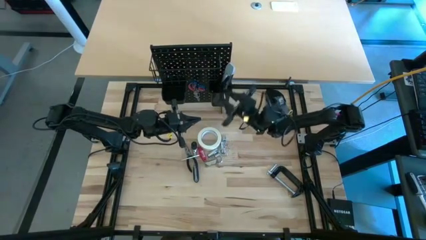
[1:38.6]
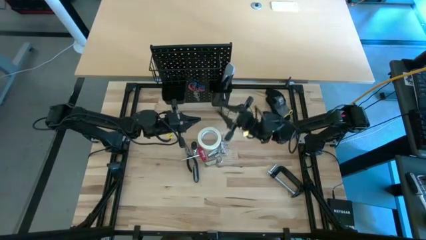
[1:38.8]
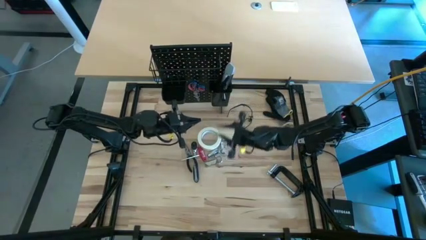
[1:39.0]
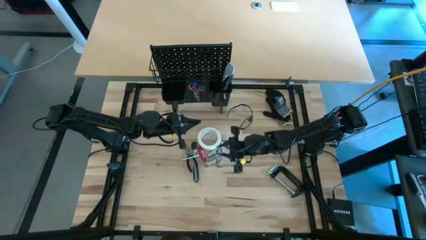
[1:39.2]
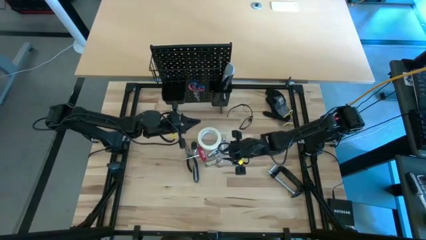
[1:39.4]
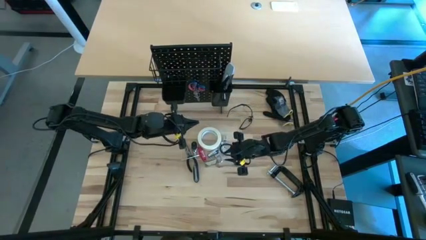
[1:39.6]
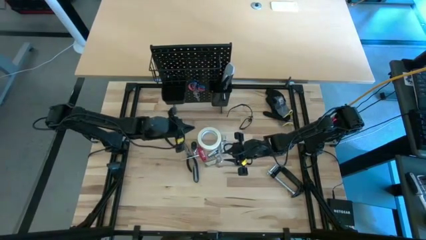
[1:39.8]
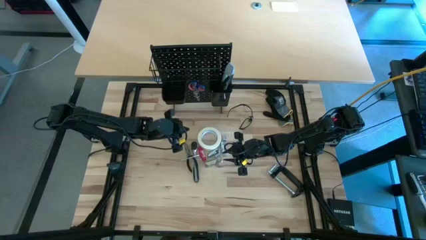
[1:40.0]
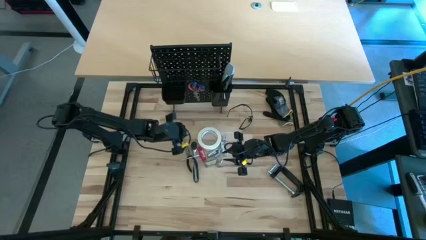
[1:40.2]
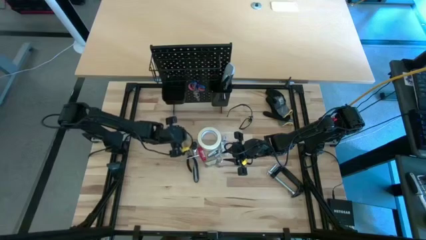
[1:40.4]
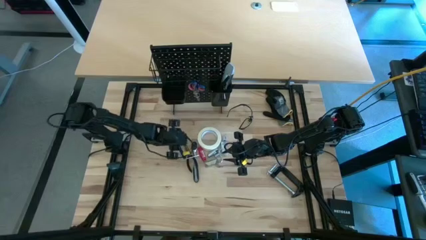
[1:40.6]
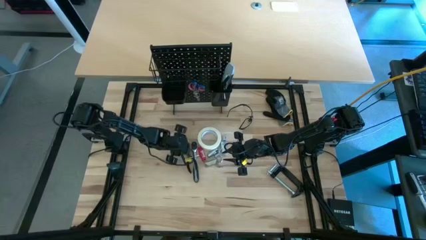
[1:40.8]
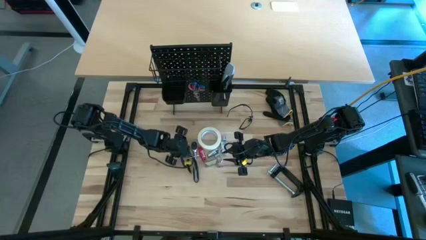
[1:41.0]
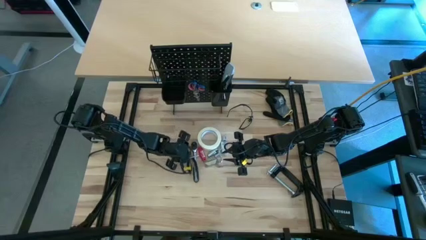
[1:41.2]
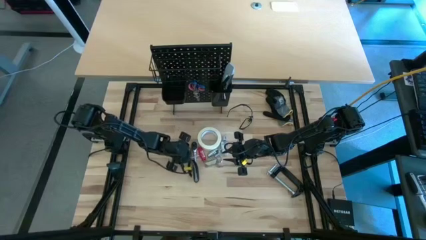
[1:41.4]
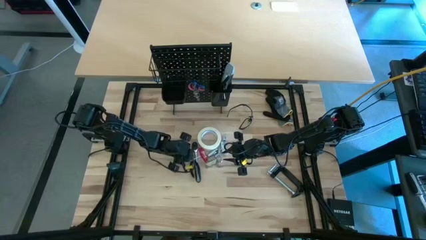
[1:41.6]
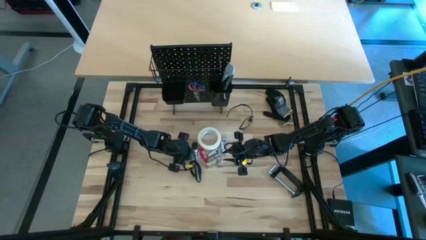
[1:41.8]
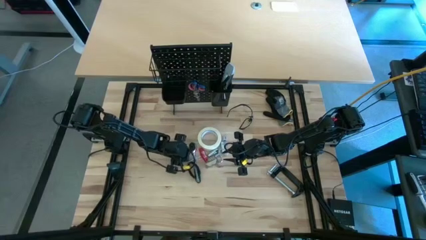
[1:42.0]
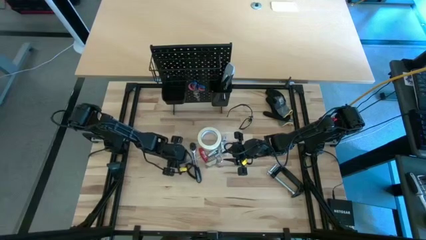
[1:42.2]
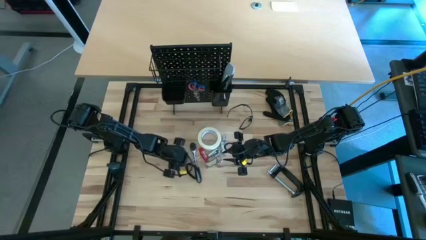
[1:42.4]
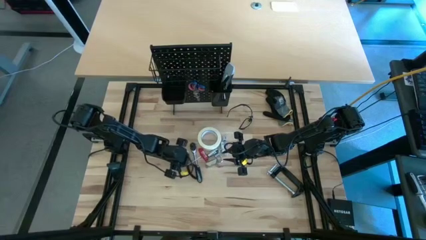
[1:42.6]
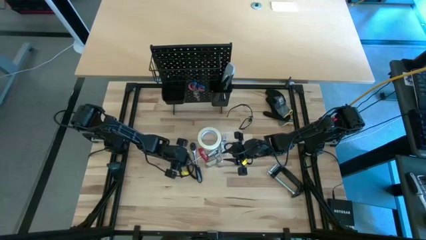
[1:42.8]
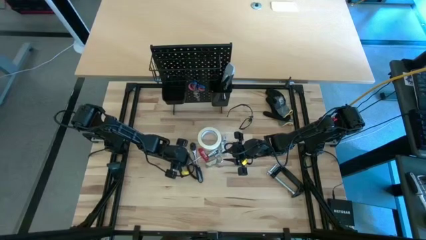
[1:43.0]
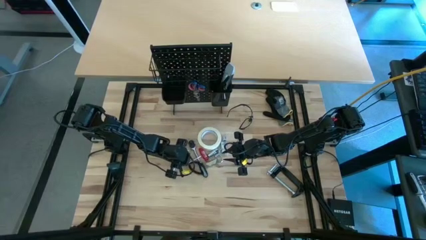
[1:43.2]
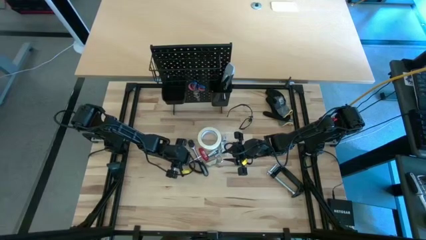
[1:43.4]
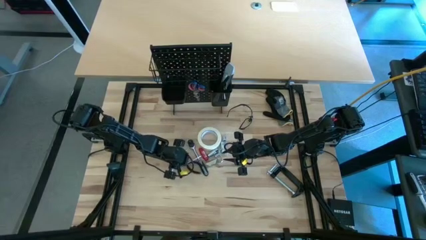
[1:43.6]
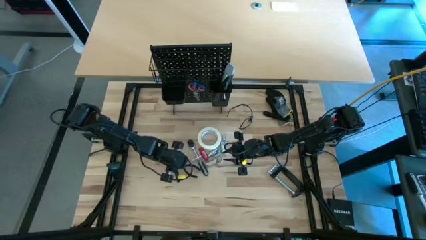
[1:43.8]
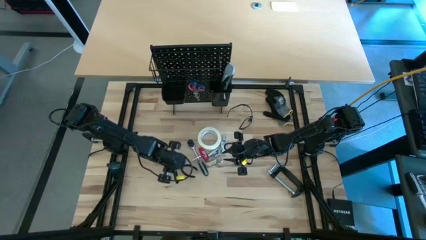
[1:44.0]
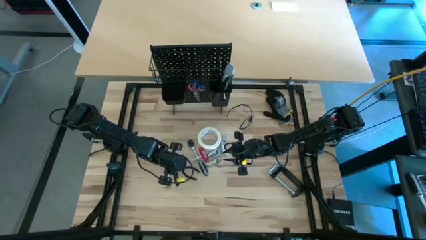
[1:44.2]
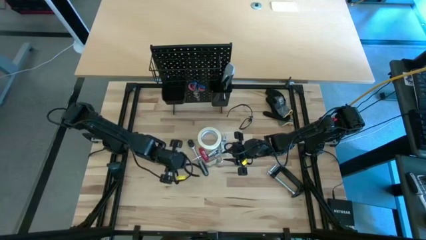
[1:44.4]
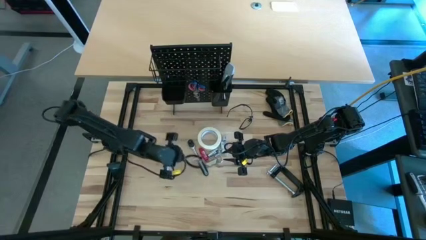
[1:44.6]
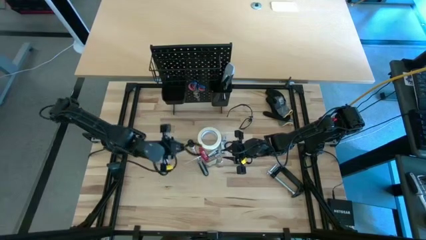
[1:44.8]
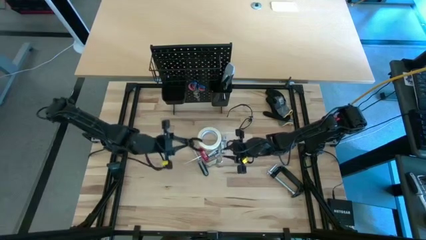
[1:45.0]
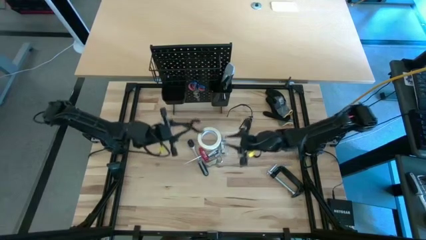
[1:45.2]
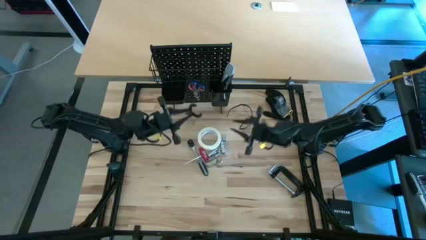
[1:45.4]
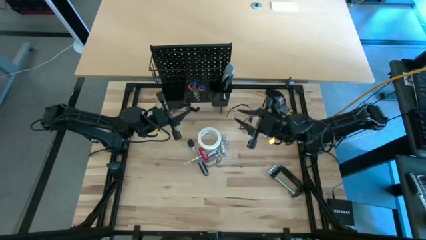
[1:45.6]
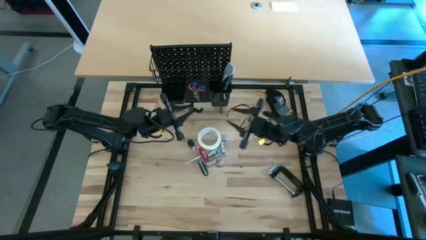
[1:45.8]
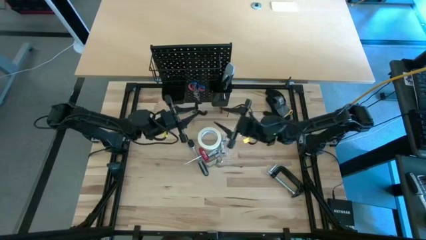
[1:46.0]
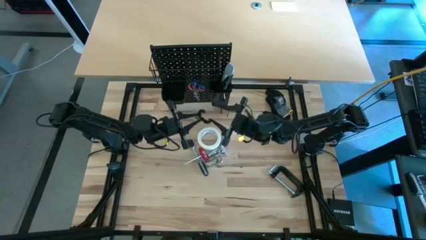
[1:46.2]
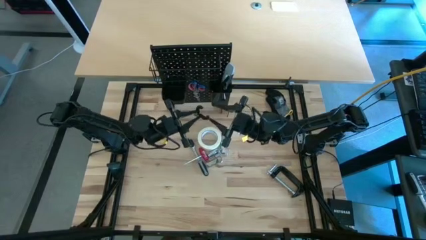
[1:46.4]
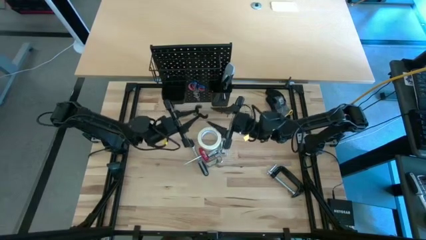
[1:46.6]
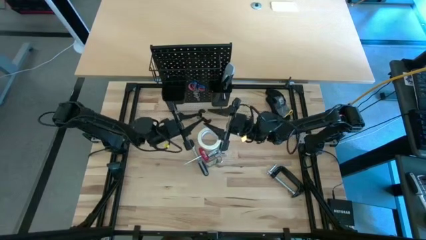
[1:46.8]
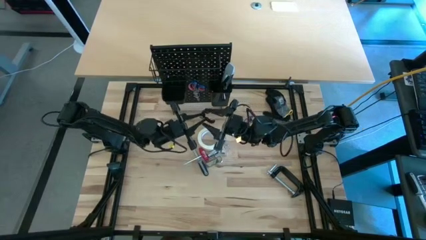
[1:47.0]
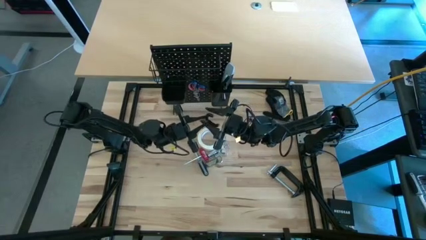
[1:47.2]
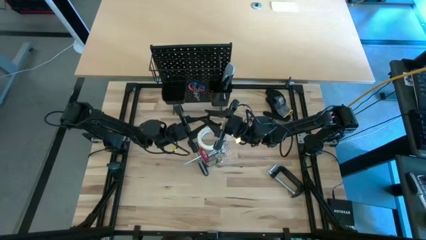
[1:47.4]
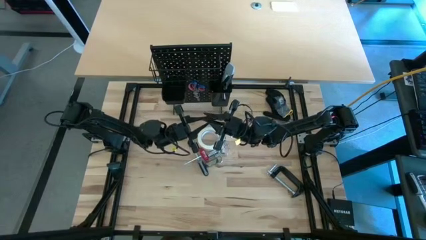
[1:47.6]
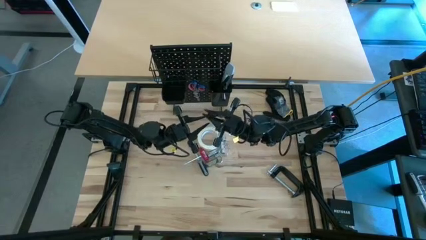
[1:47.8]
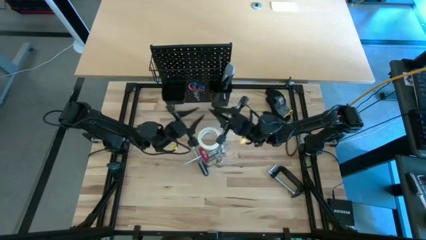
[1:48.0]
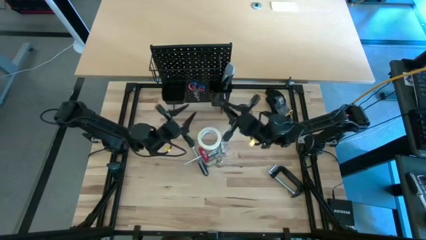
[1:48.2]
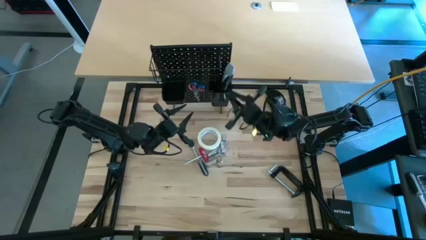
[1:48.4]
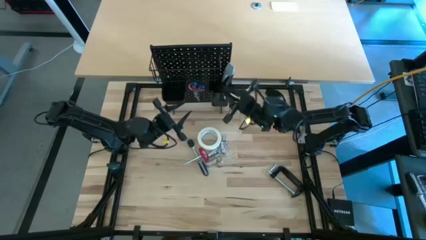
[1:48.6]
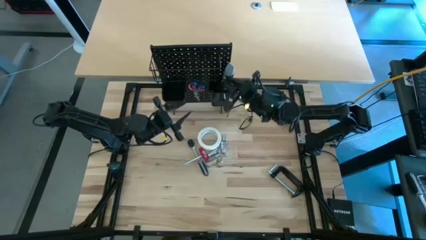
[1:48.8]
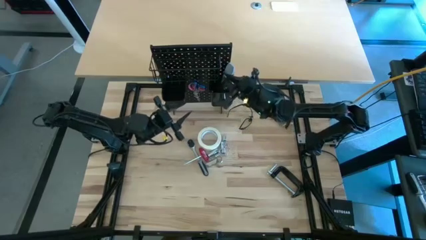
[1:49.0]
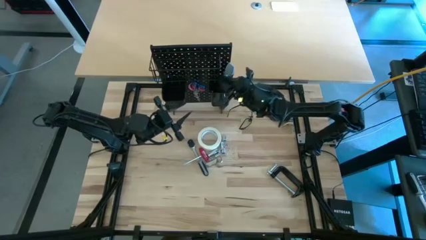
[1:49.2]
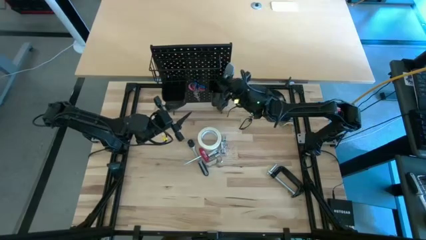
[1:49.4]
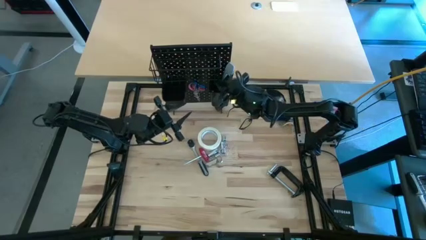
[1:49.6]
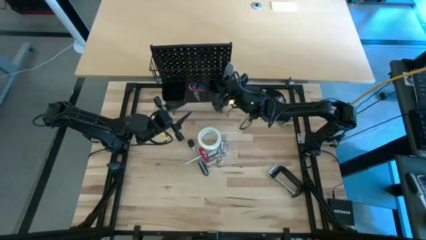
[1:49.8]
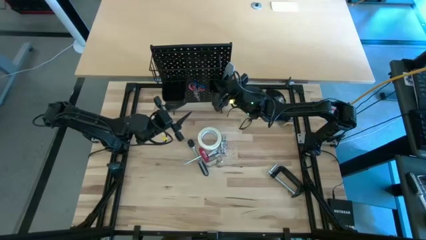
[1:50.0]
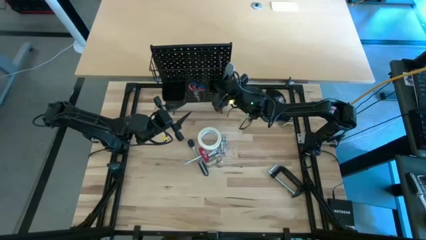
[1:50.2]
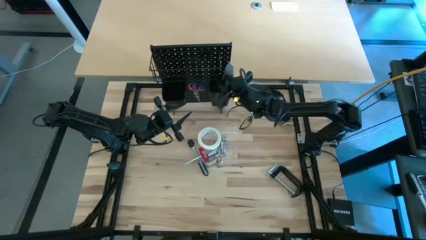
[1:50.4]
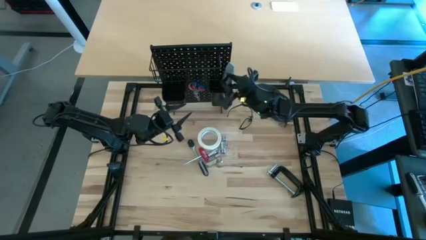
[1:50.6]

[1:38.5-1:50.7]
Task: Hang tools onto peg board
Put the black pliers into the right black bin on the peg board

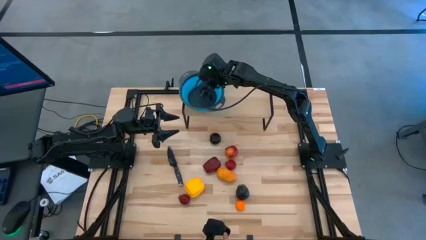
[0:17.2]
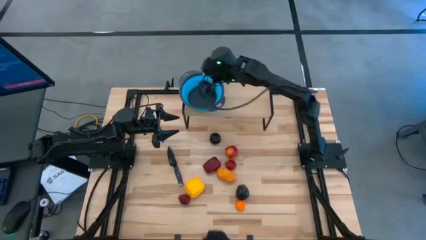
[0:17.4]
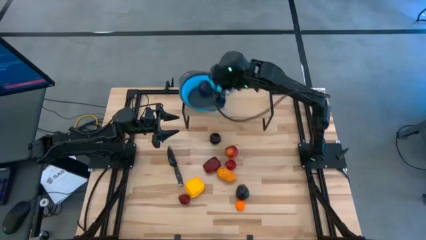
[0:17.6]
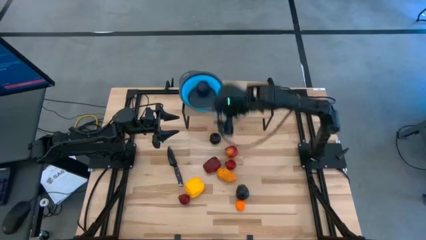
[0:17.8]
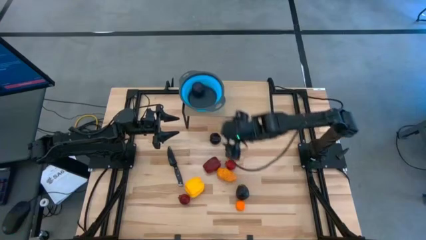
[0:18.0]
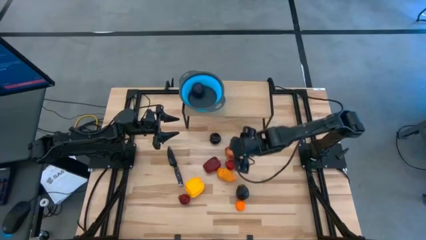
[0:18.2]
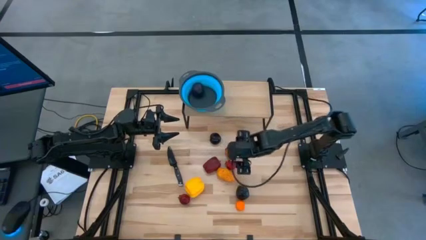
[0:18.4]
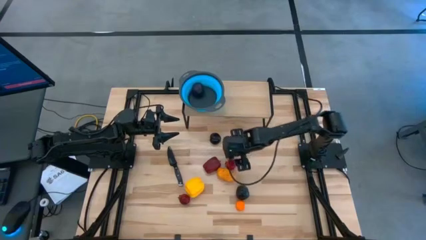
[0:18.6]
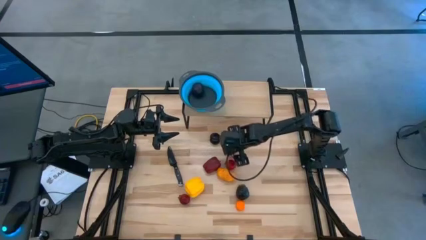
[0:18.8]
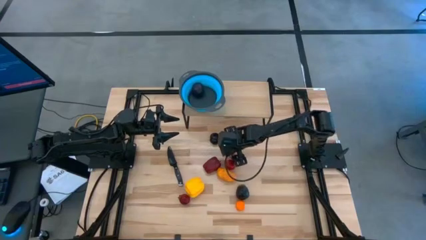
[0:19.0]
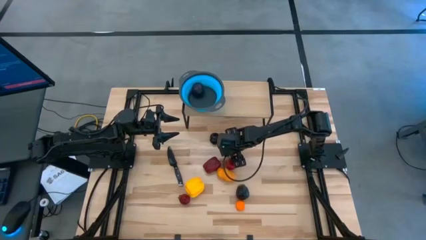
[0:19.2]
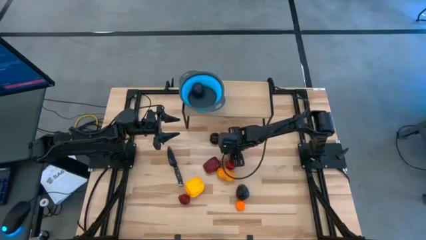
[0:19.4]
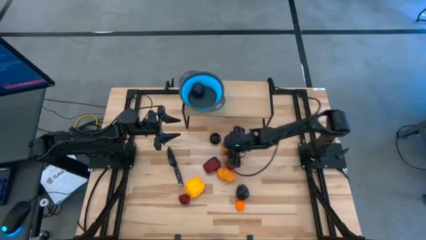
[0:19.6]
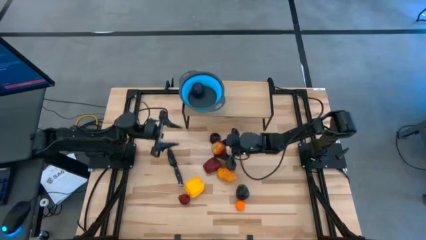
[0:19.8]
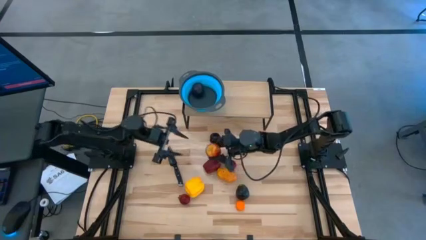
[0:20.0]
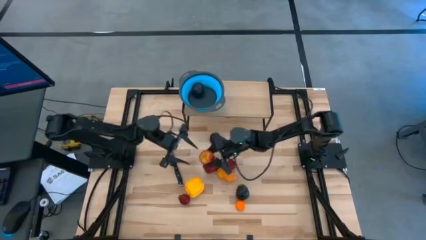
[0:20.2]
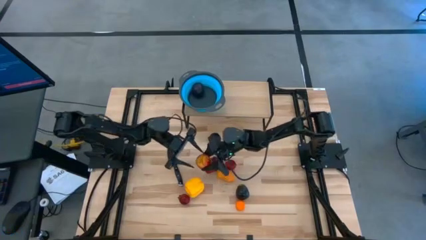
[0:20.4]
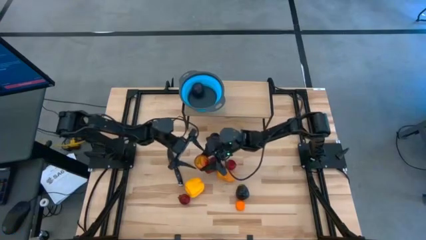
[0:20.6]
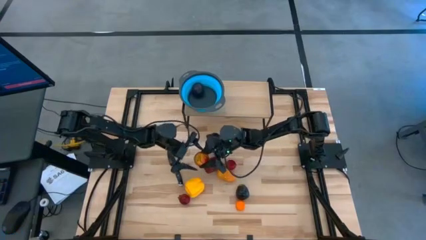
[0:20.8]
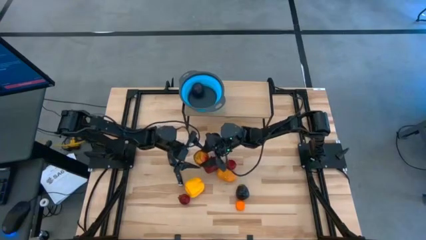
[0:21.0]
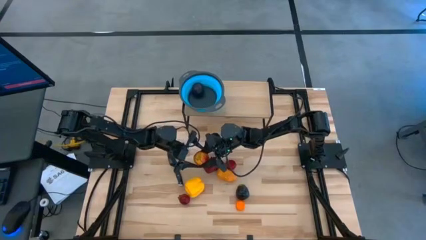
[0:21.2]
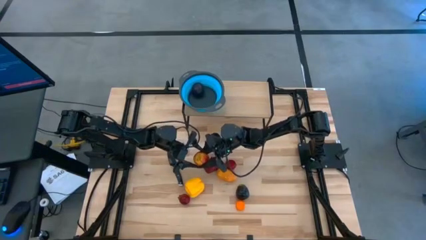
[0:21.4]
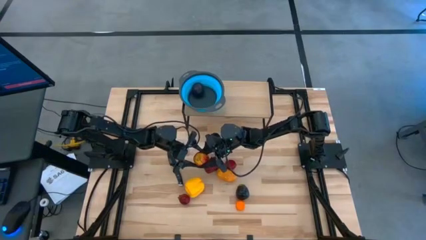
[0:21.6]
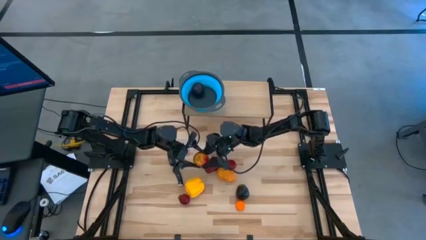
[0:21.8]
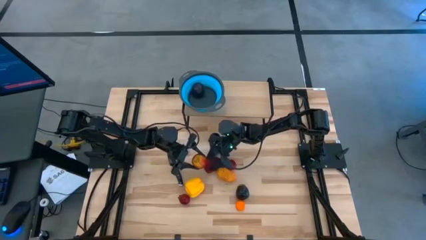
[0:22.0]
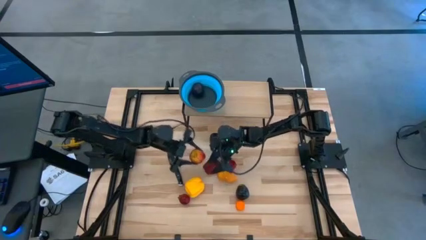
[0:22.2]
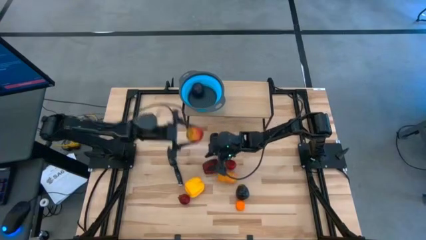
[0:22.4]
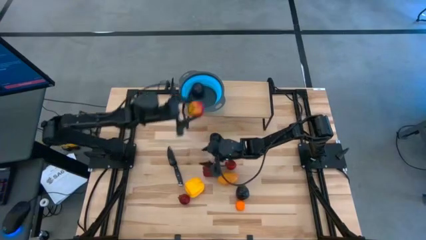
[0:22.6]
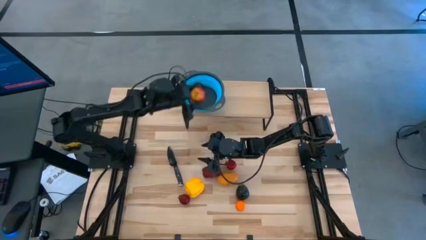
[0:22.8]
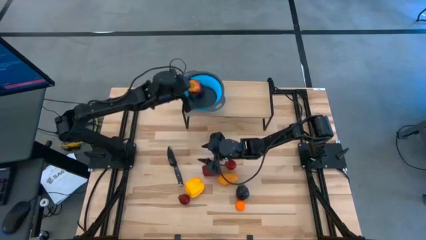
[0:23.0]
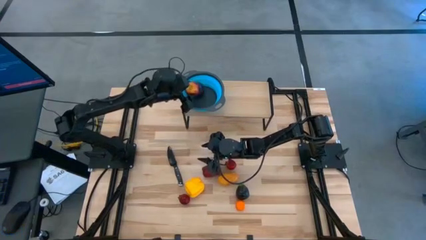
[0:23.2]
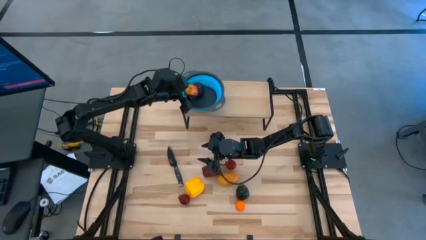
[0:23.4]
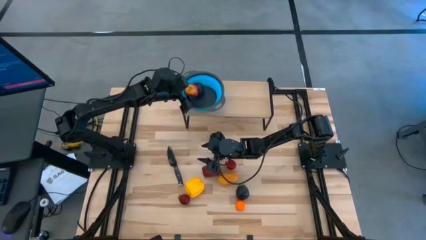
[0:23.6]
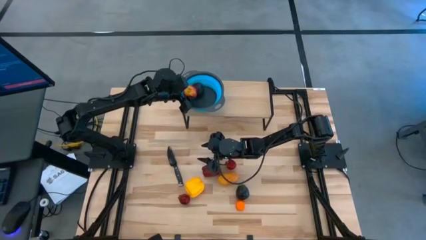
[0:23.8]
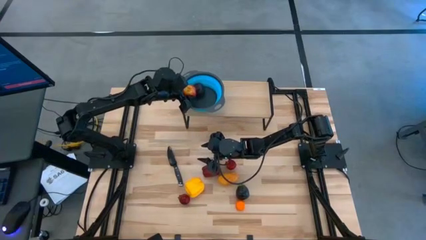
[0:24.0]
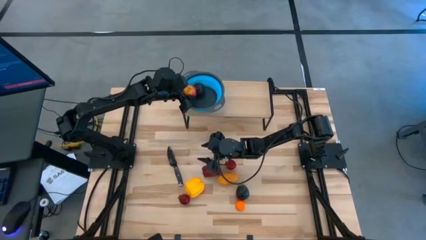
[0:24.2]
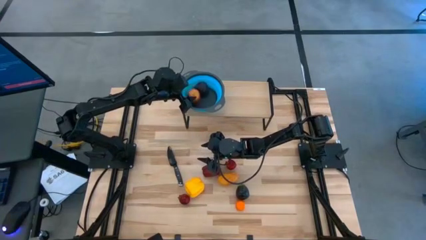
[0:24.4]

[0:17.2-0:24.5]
Task: Pick & Place Fruit
Put the red peach into the blue strainer bowl on the shelf
